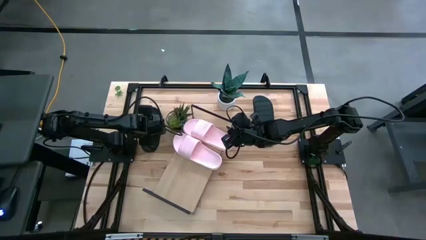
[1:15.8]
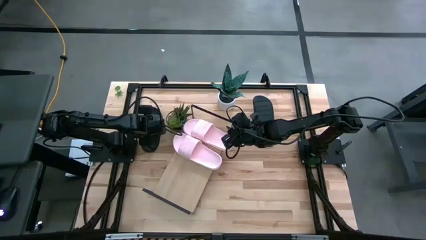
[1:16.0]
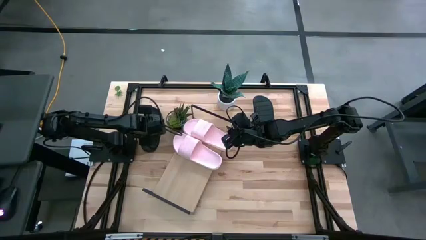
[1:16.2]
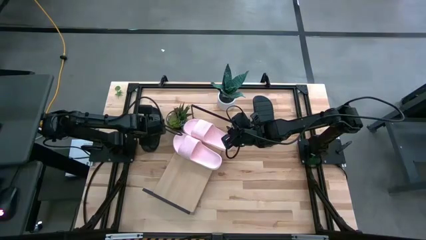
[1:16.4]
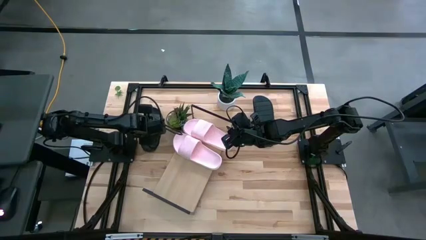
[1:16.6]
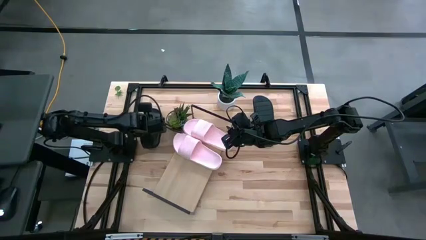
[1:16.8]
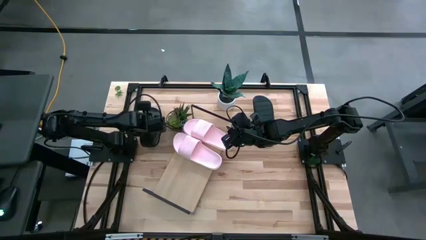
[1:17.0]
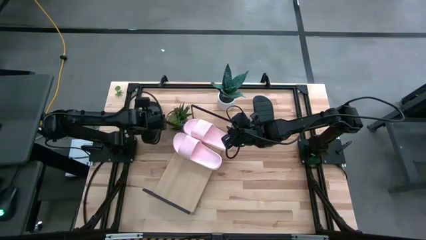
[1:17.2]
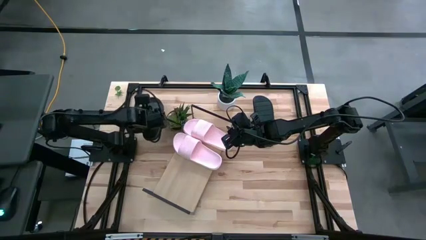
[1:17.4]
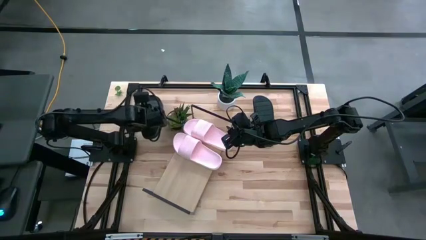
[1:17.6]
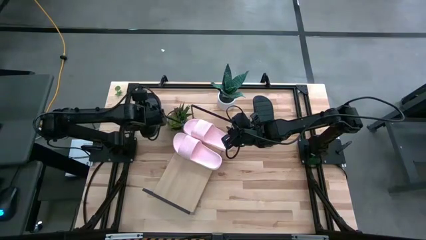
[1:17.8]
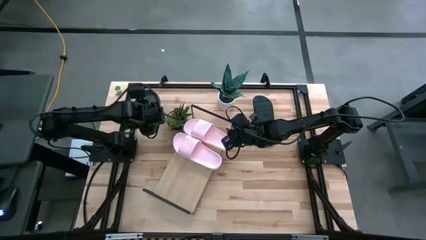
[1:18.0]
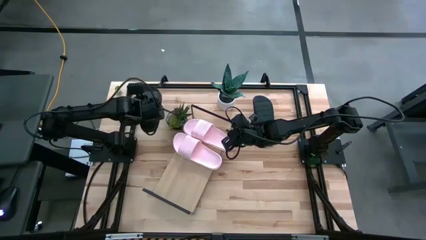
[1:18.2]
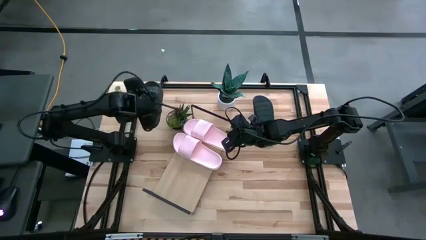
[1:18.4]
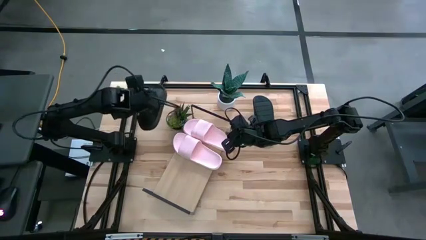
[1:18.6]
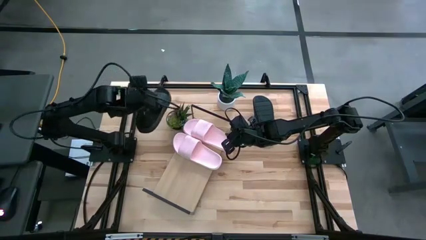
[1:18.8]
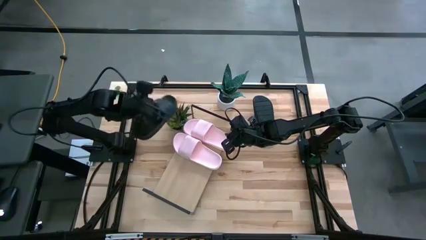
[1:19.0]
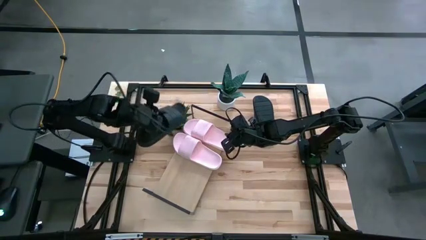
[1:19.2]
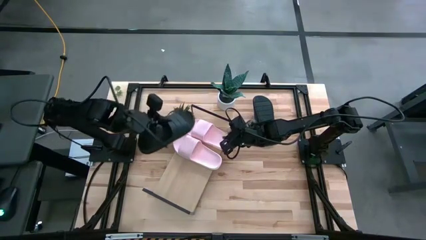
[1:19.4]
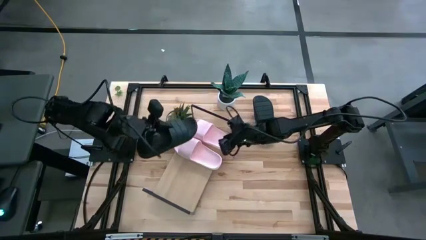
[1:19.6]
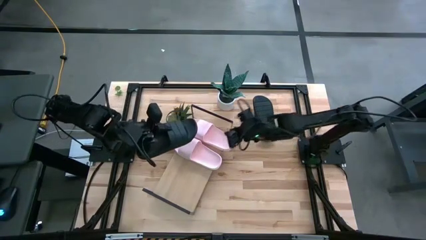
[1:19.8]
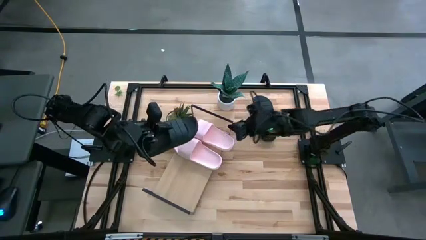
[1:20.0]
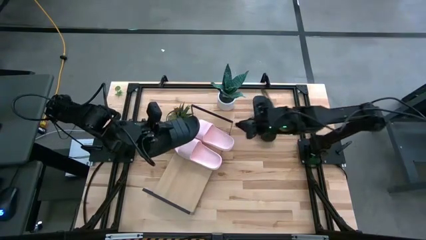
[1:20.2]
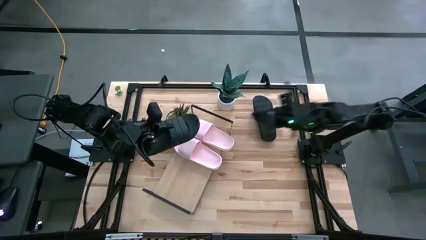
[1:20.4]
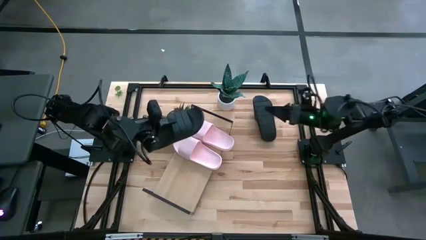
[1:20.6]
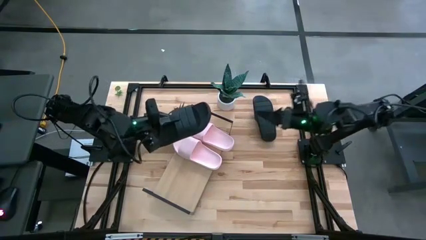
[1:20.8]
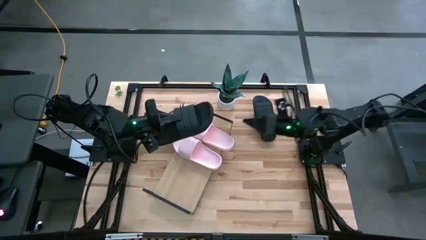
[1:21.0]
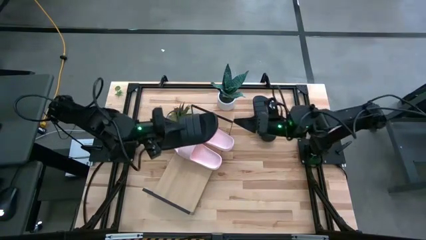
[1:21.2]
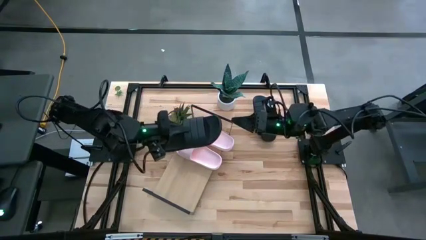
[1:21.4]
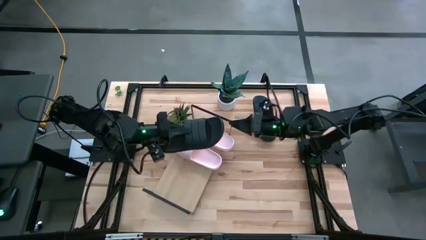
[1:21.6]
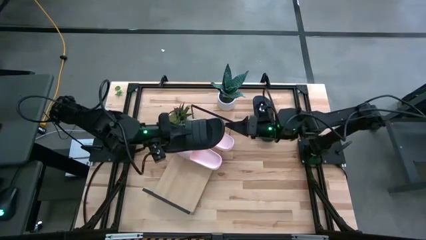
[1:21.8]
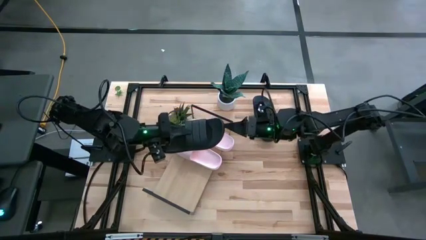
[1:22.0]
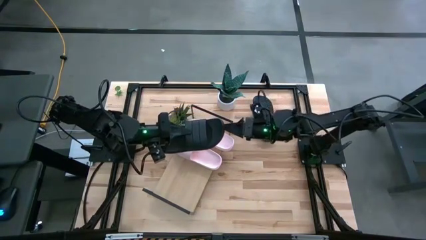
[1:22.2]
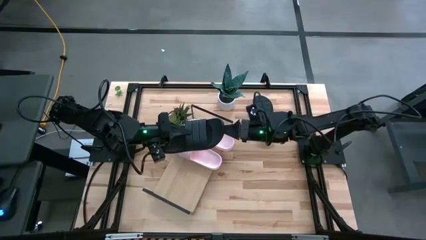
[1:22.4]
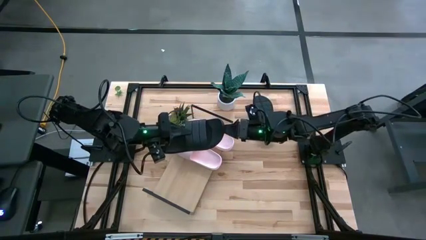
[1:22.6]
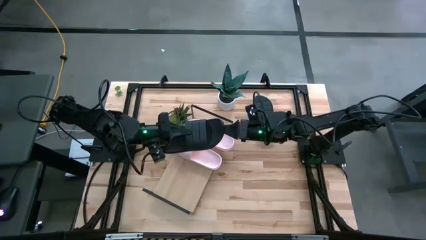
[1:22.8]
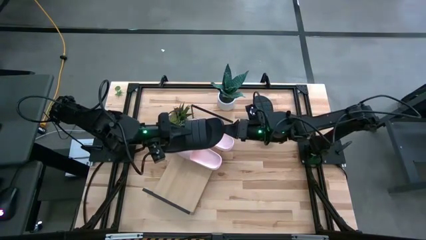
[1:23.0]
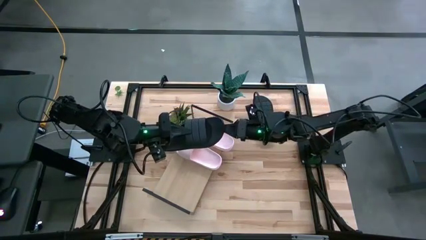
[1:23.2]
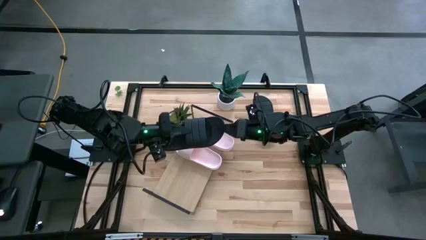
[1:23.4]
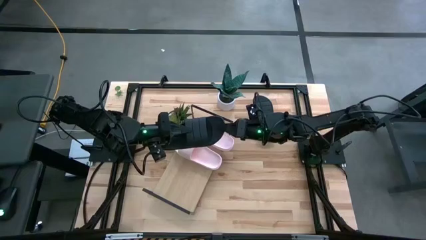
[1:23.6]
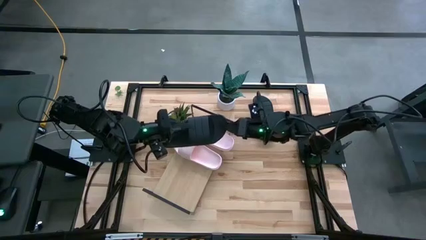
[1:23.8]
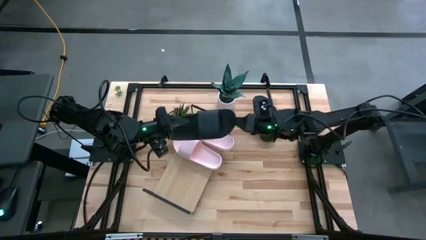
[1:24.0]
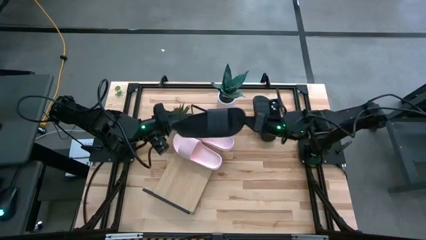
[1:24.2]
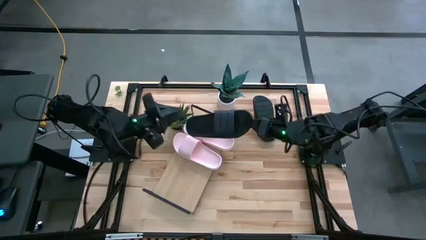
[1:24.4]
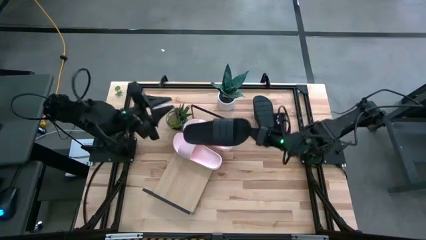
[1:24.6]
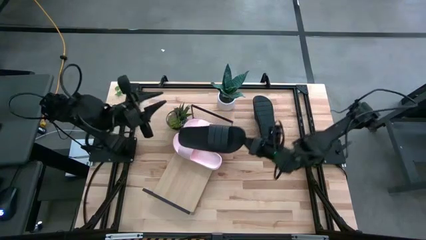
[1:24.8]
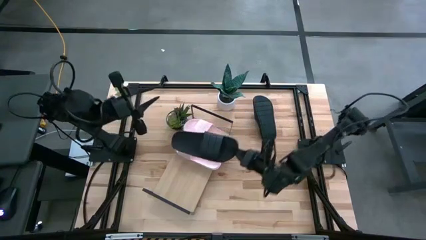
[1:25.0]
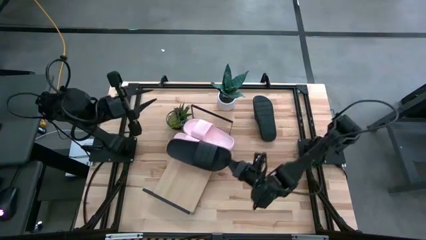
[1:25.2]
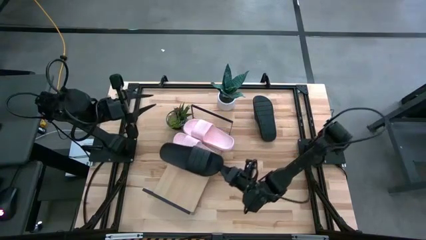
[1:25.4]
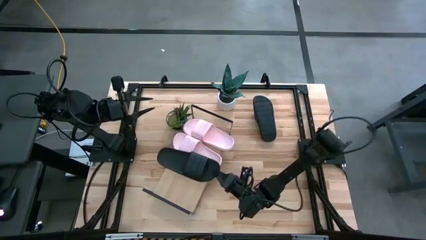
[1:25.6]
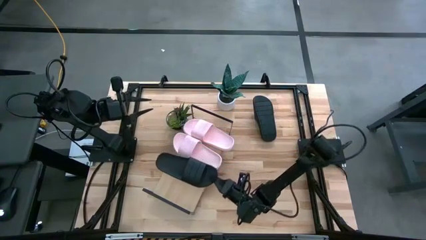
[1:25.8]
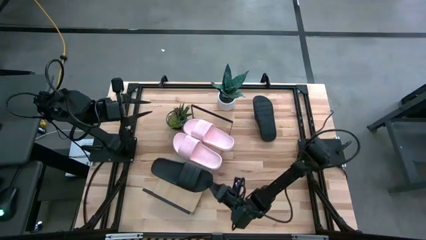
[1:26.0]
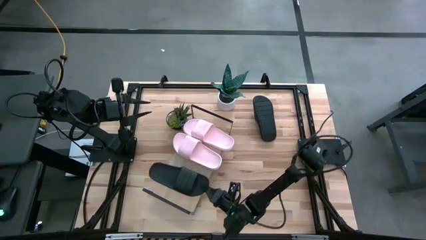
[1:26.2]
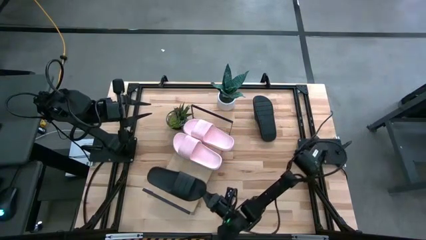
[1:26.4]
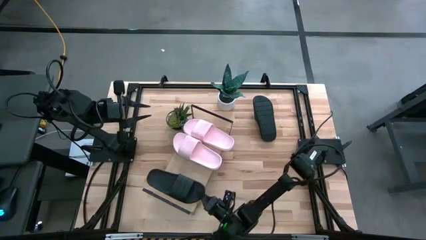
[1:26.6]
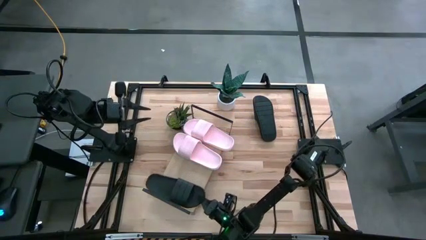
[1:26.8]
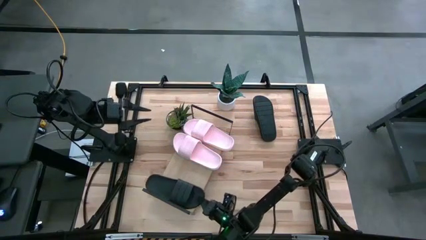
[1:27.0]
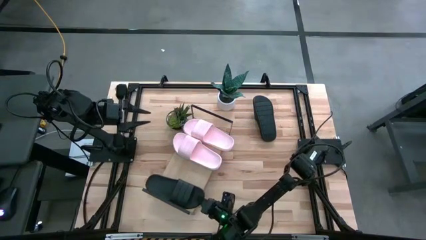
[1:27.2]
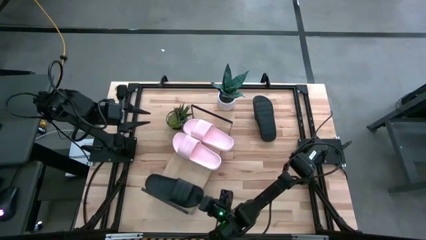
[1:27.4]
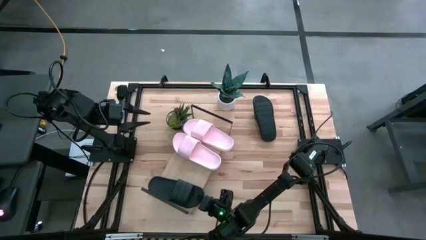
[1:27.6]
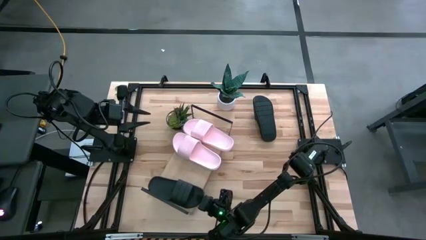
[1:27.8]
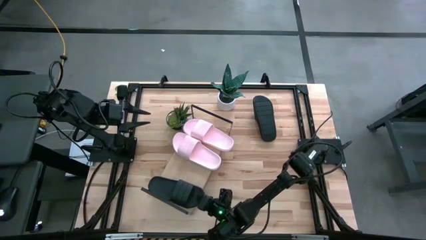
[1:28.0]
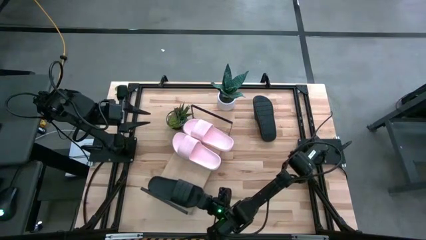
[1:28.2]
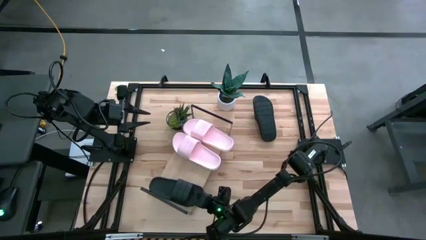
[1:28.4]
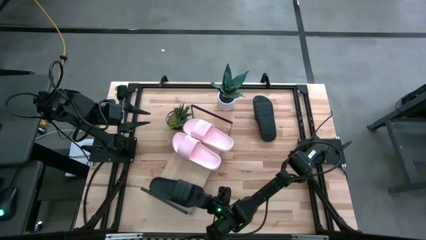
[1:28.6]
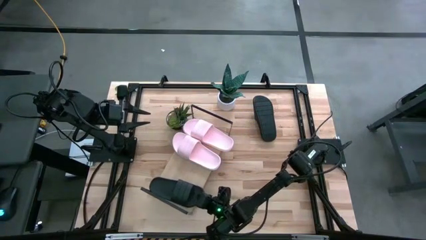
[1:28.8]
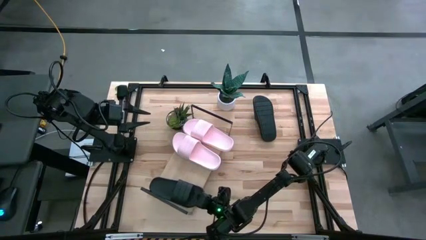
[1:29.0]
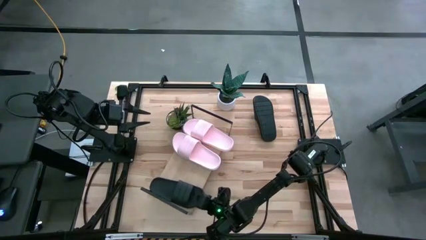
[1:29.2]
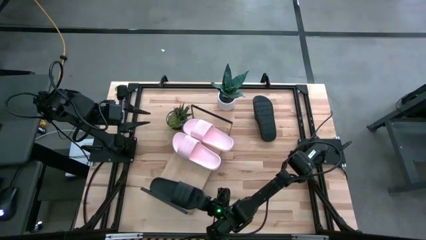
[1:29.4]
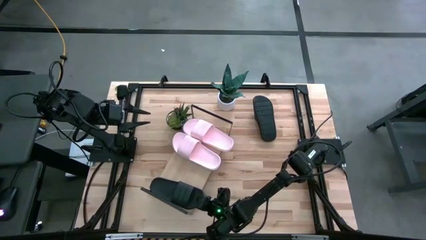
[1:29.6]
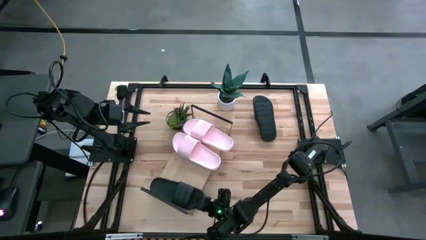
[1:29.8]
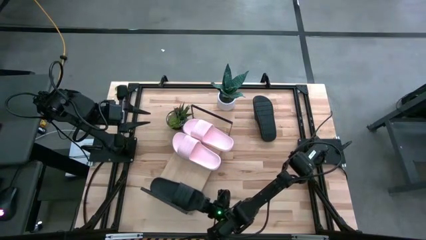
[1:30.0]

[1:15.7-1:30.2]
Task: Pick and place slides into the shelf
Put the left black slide on the shelf

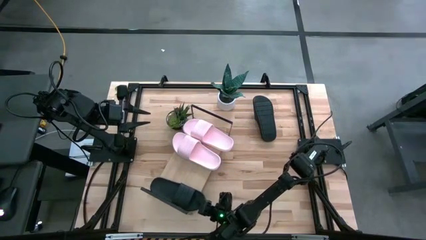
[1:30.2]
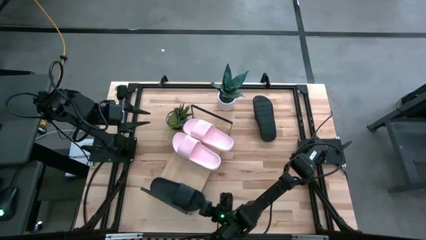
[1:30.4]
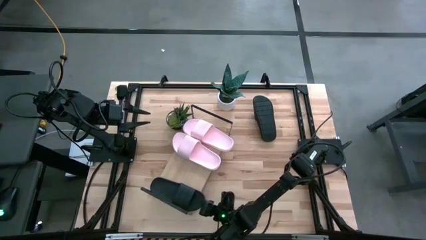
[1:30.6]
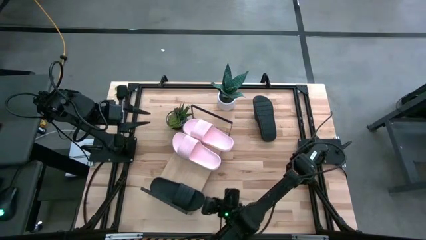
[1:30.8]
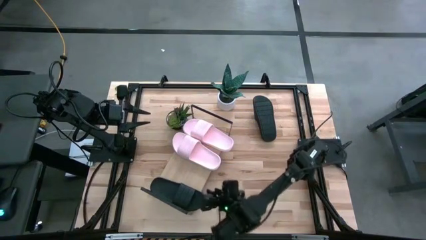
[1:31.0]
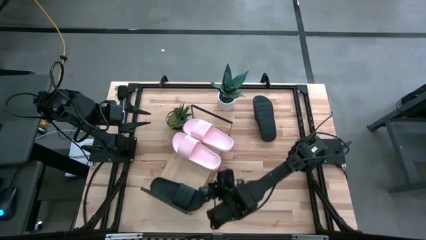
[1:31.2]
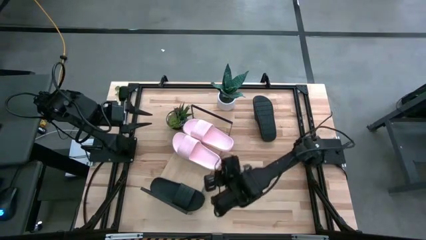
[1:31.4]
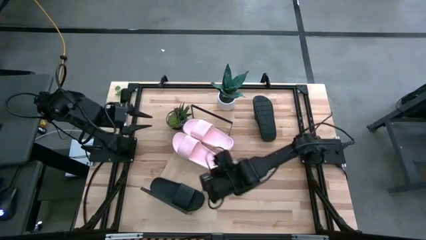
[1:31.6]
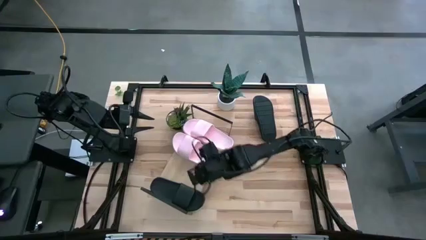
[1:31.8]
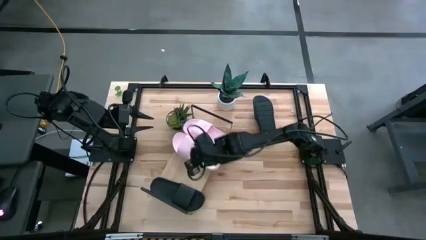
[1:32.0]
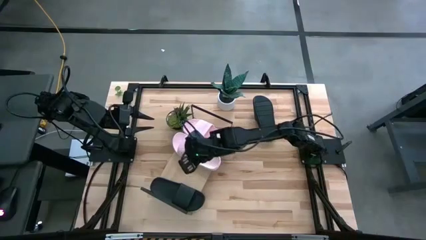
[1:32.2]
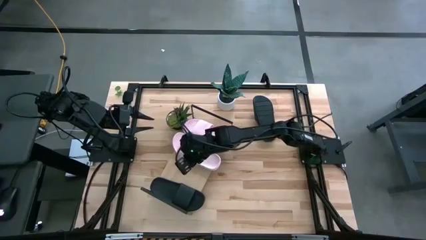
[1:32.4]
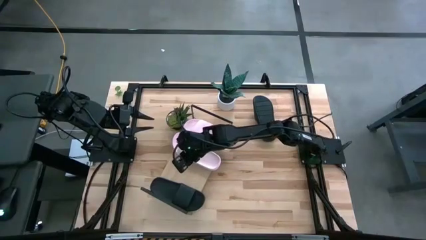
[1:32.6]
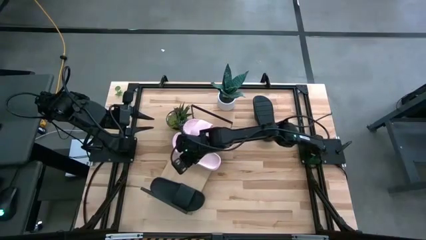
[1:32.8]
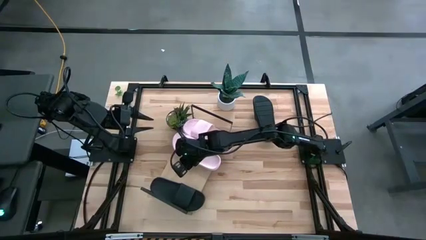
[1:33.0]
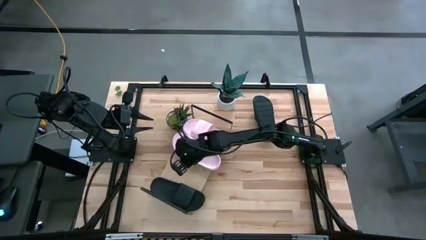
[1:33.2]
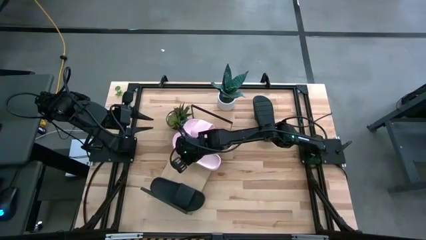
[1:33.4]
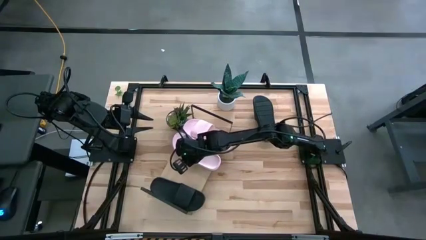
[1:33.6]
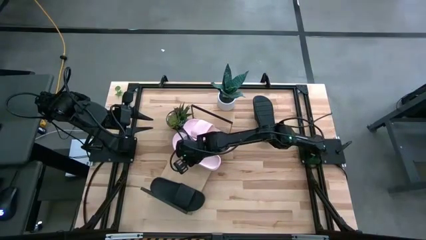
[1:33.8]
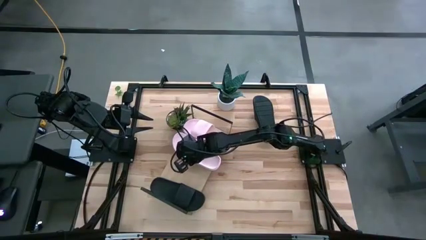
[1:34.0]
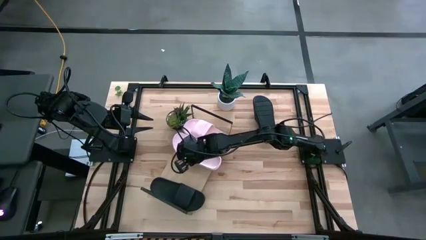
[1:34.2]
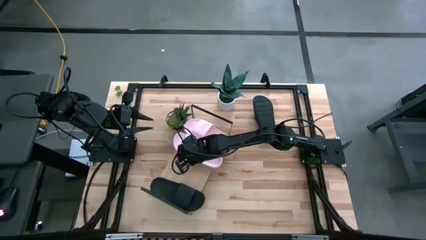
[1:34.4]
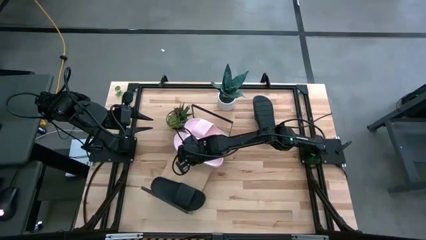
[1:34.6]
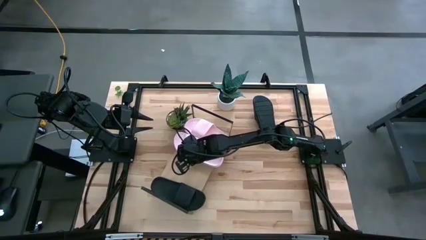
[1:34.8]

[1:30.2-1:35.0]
Adjust the pink slide on the shelf
